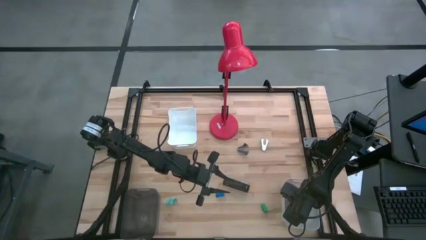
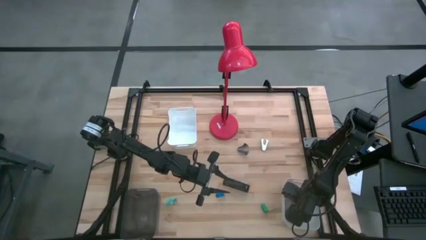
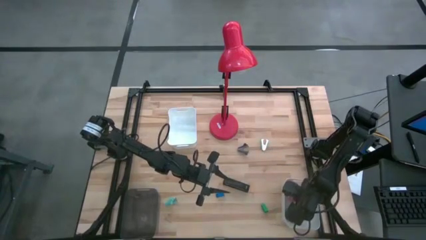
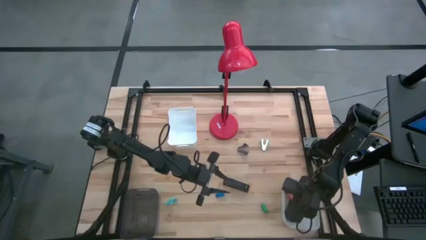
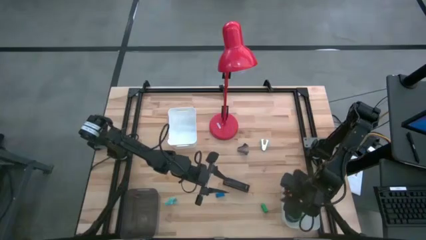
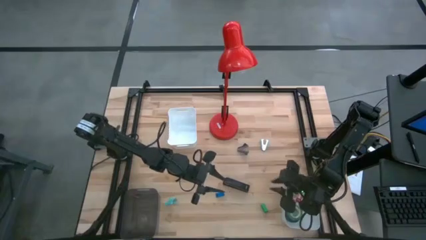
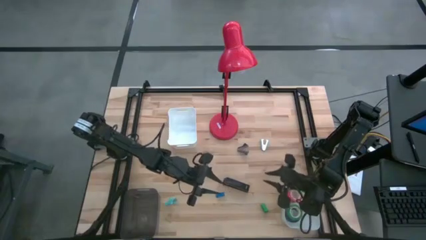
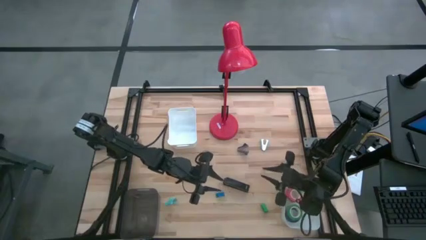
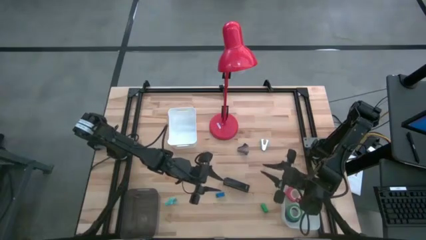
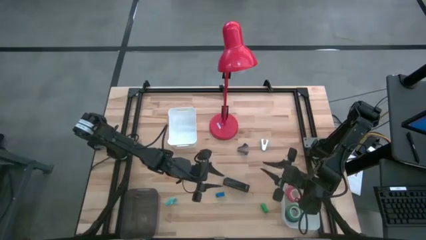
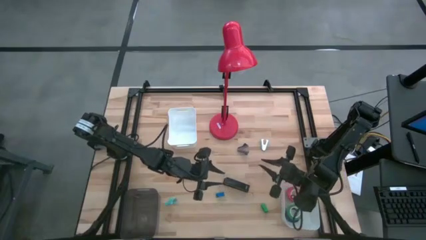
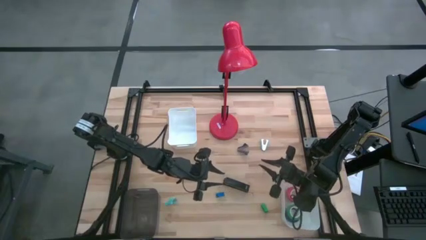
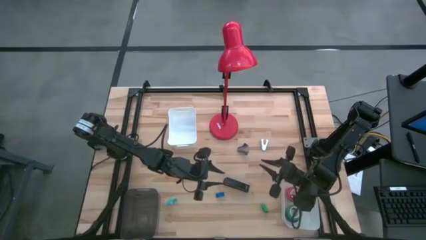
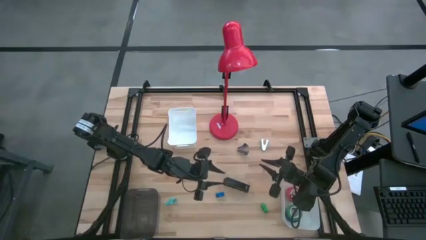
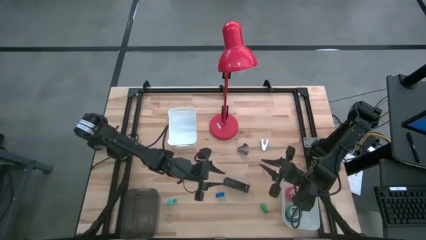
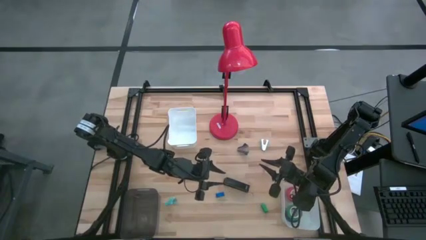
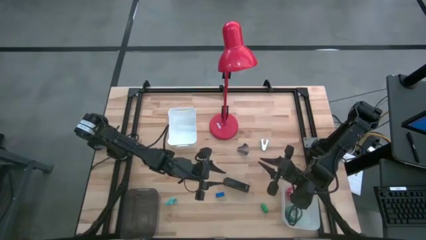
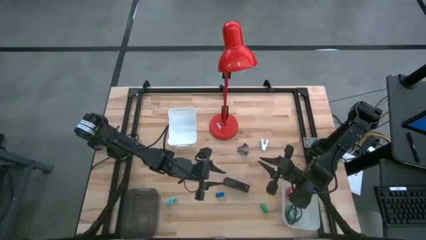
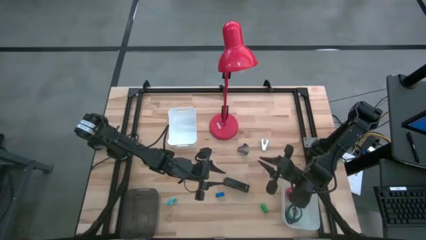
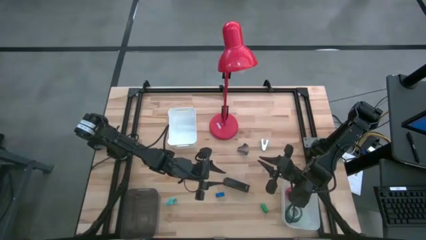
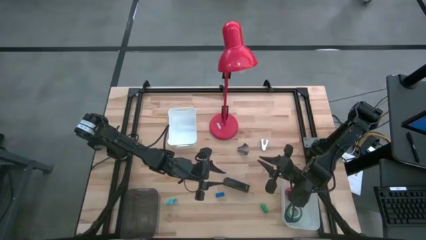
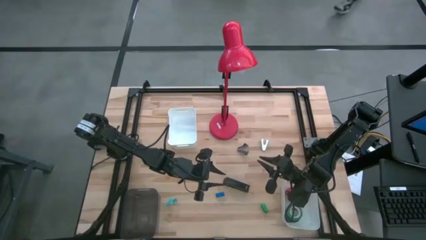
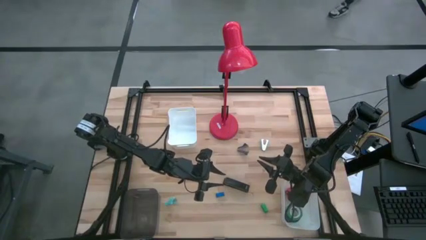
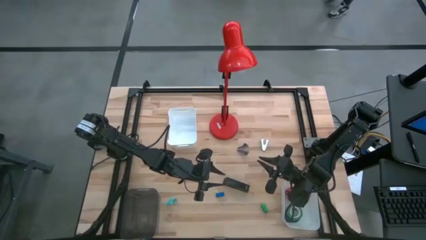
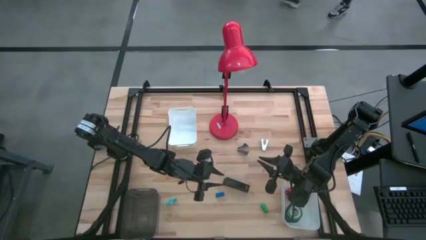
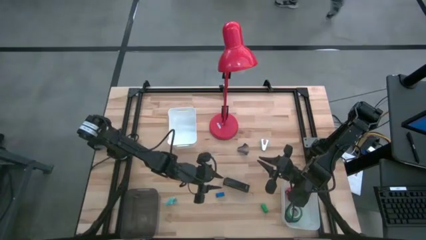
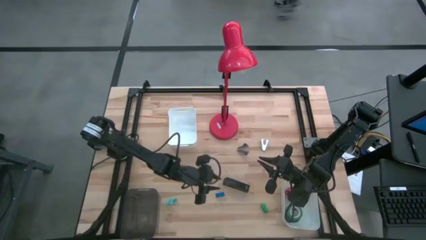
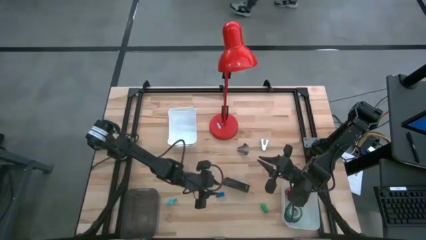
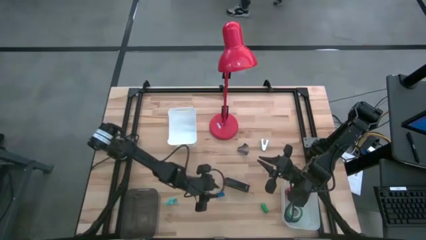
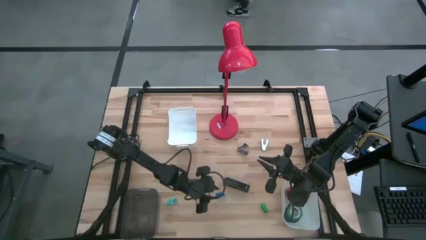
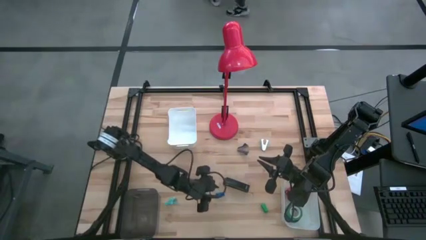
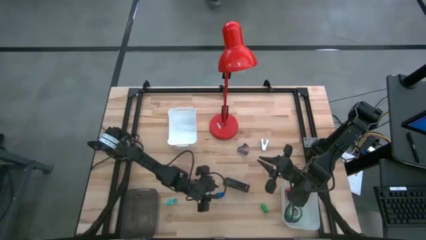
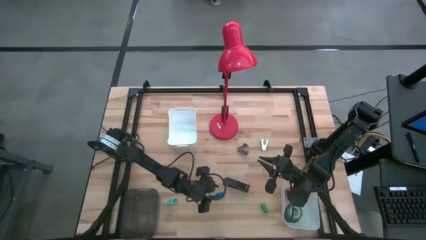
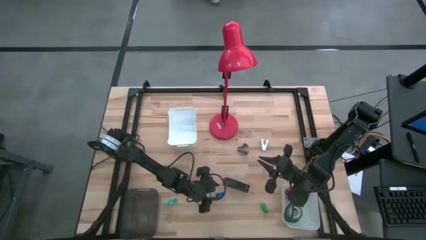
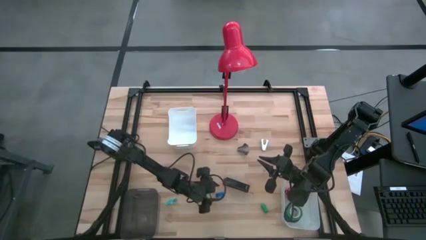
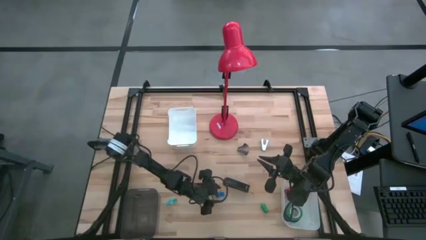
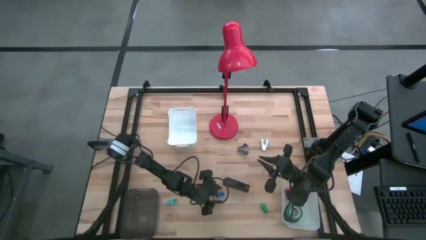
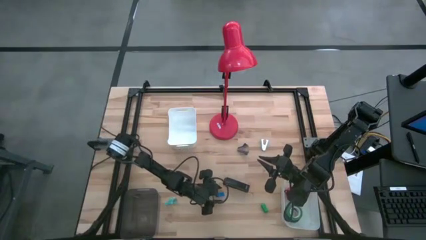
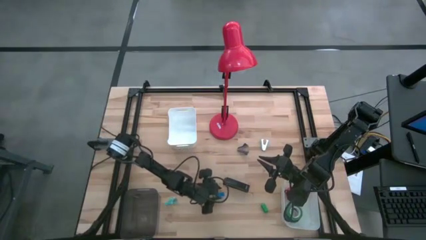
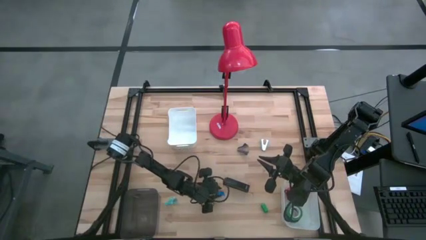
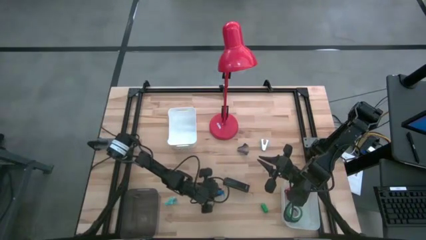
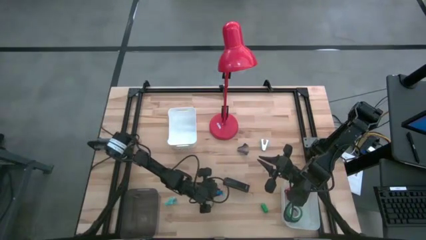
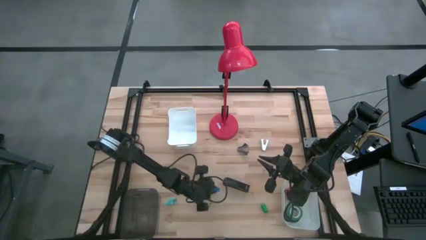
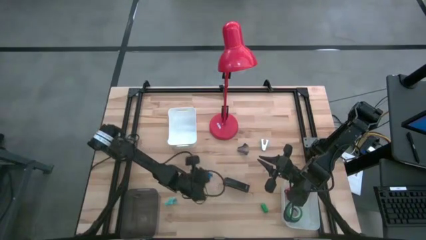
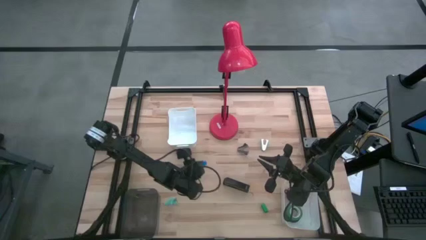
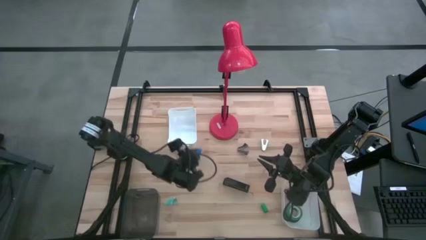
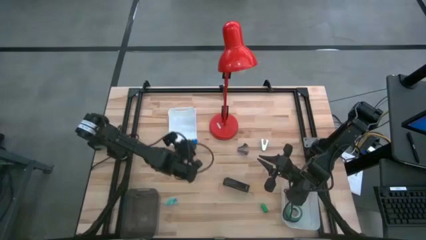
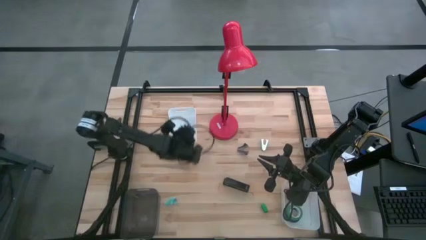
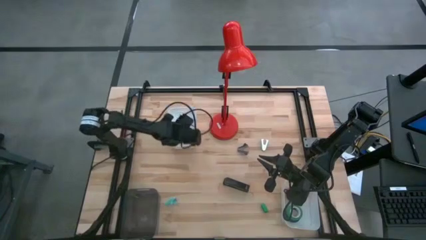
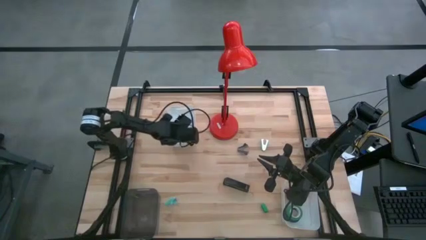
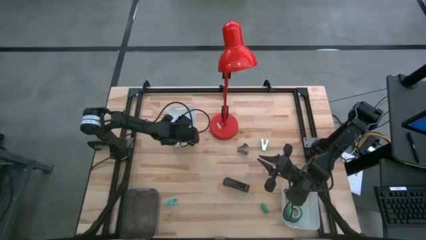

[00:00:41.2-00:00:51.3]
Task: Pick and place Stapler, Stapler remover, tape
Put the blue stapler into the top white bin

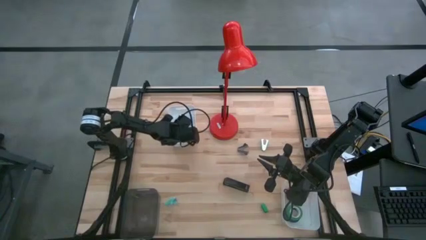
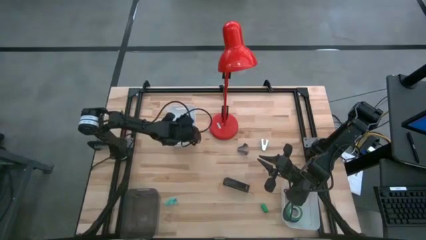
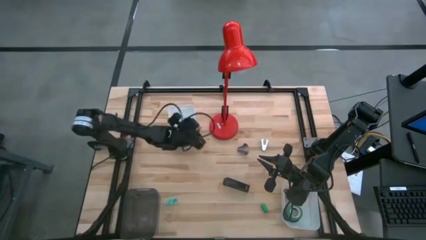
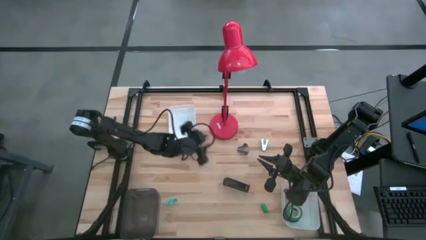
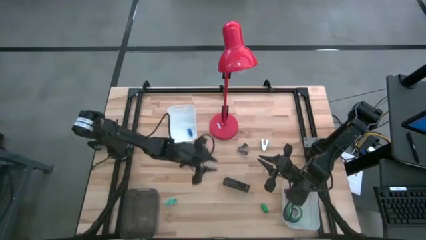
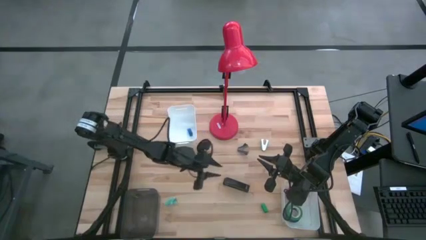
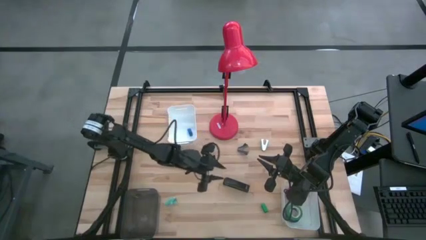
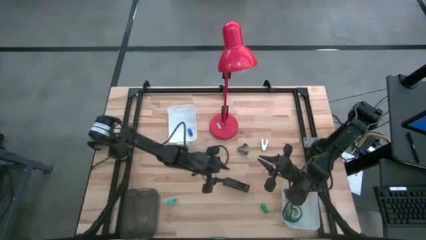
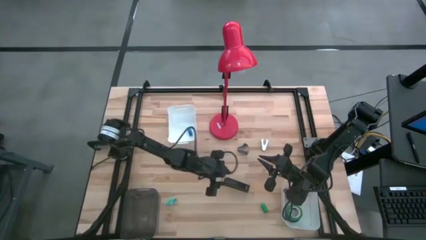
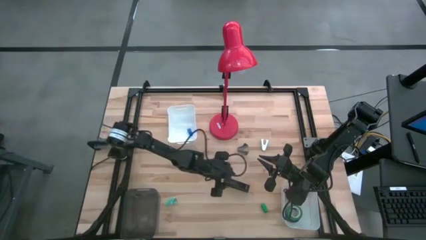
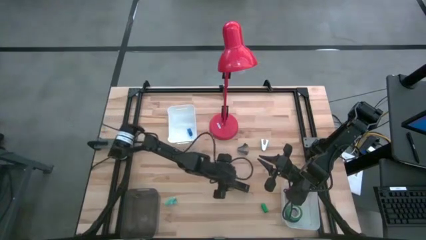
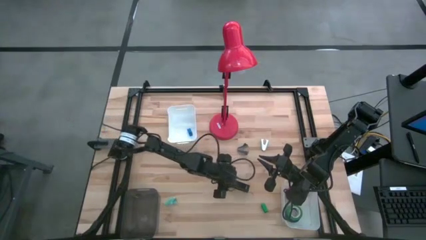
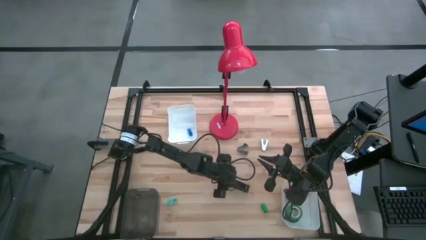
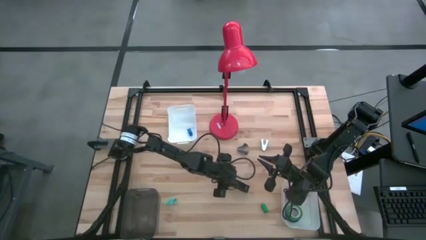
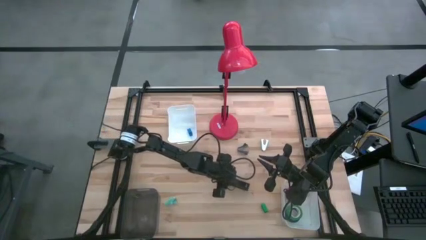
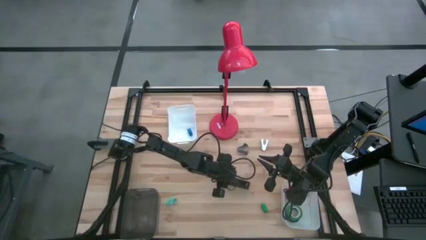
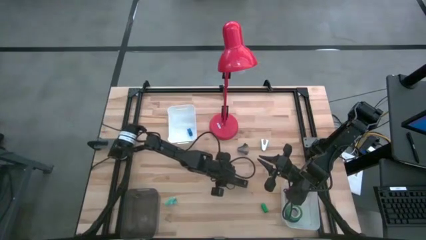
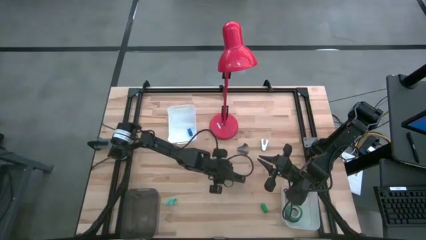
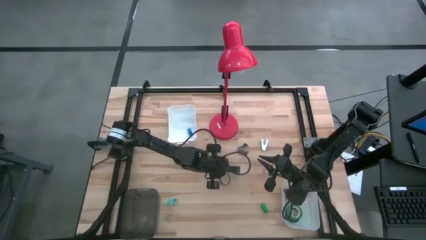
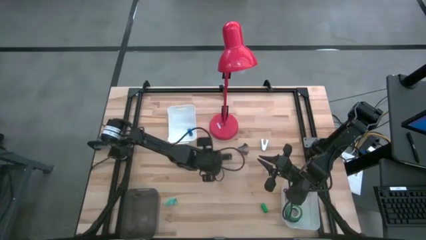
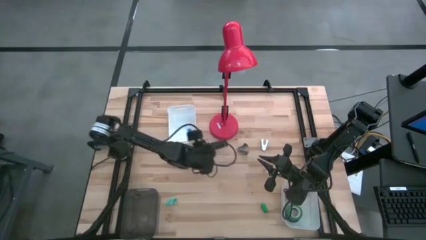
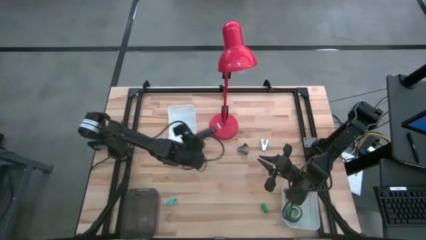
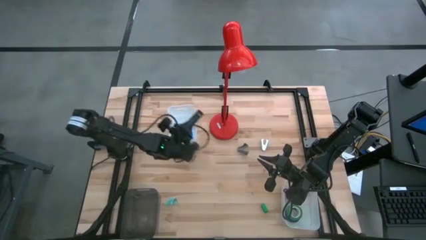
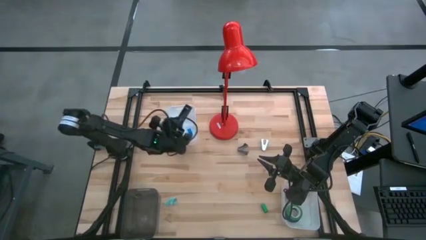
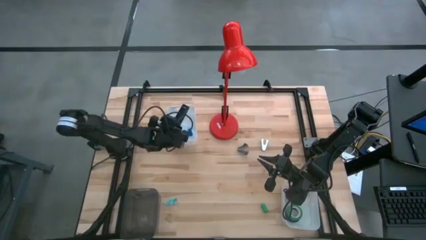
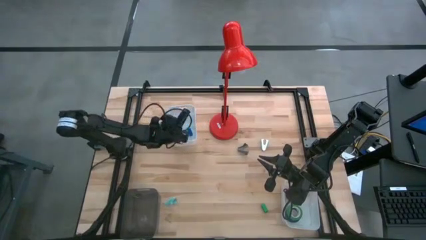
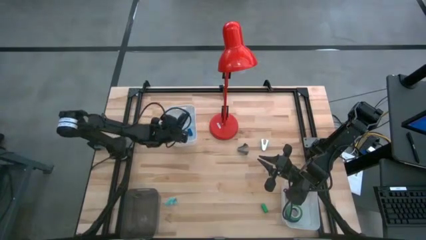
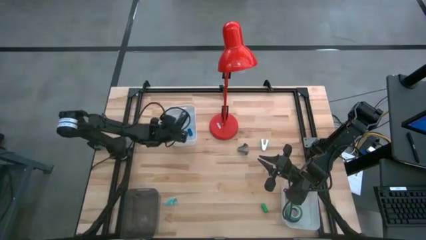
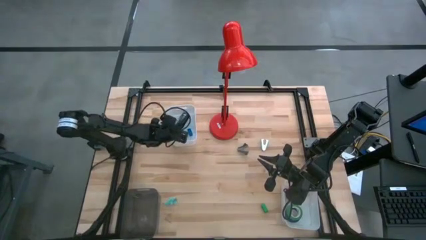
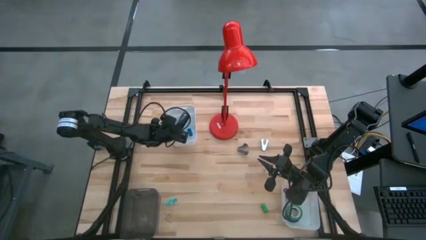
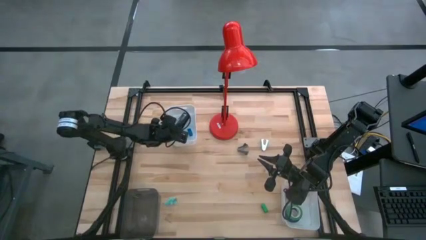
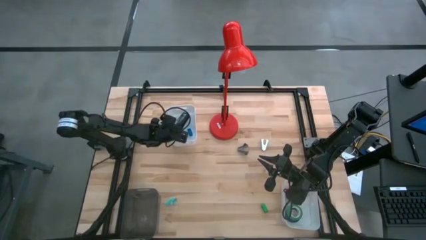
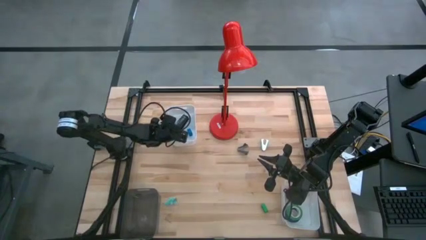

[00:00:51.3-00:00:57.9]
Put the black stapler into the top white bin
